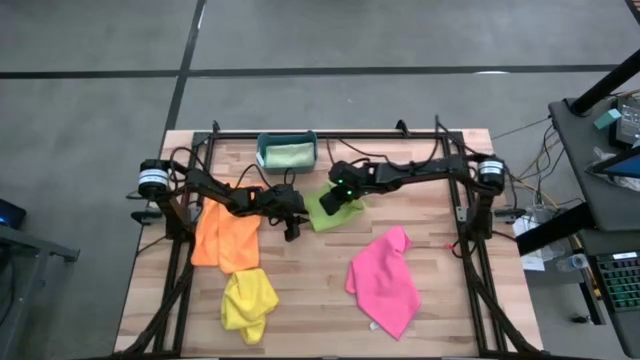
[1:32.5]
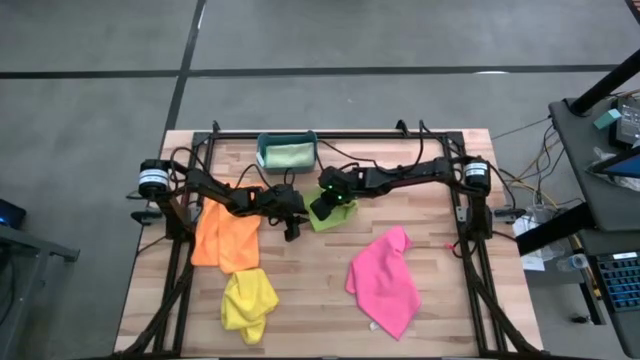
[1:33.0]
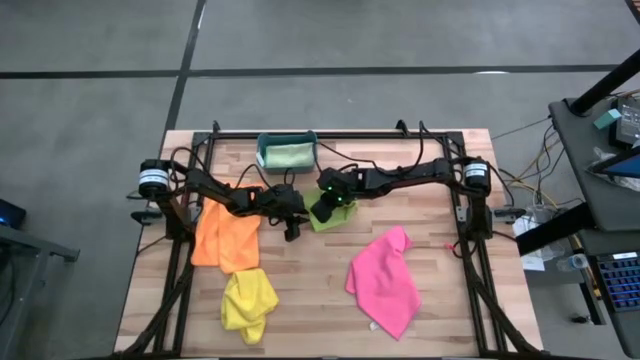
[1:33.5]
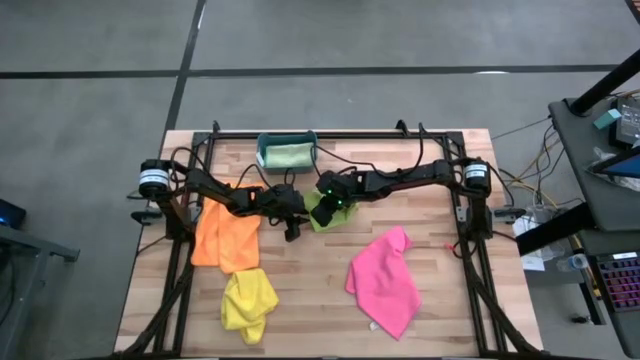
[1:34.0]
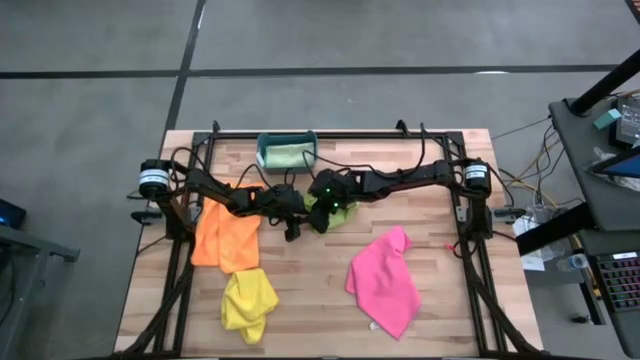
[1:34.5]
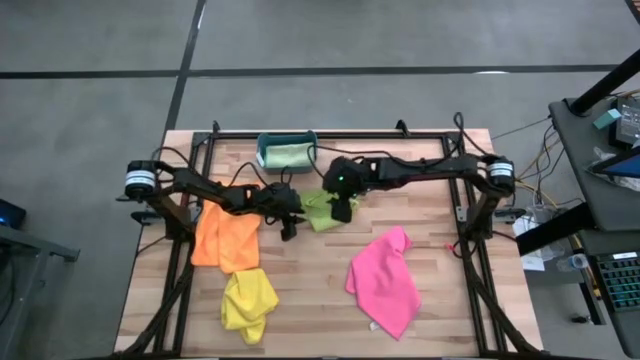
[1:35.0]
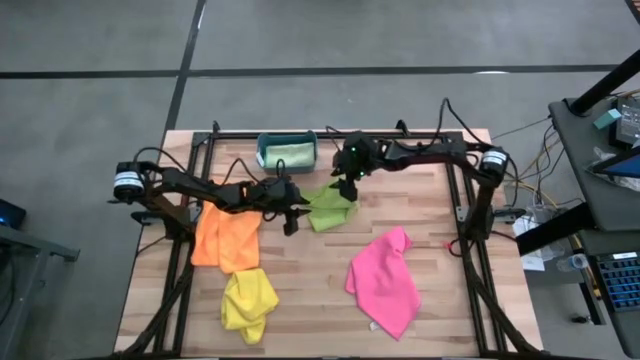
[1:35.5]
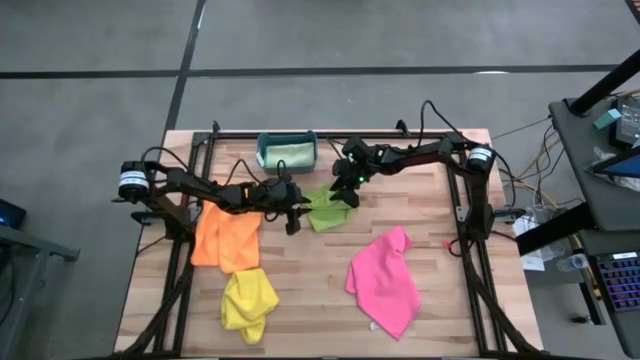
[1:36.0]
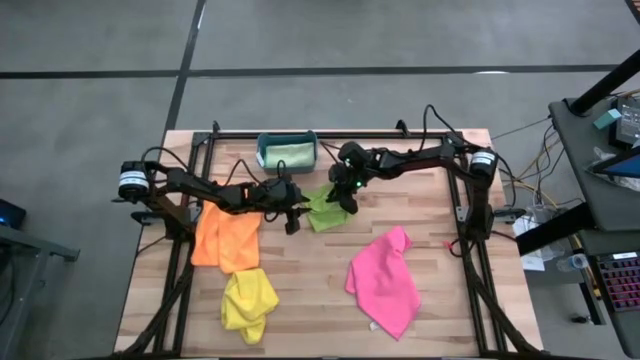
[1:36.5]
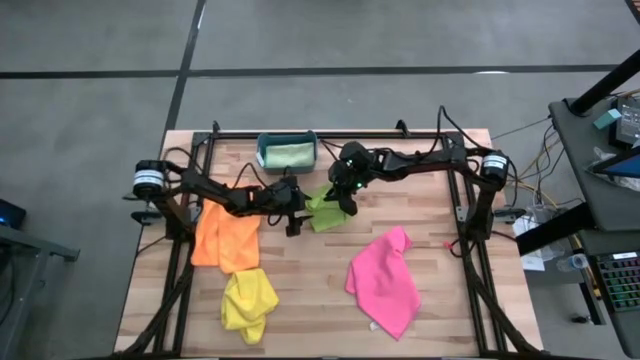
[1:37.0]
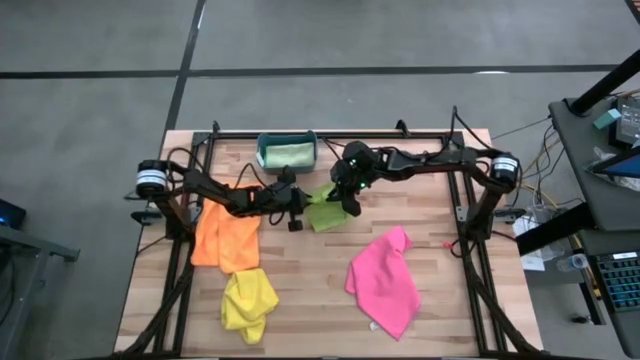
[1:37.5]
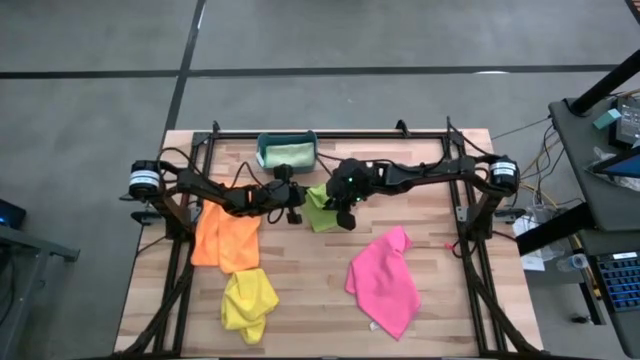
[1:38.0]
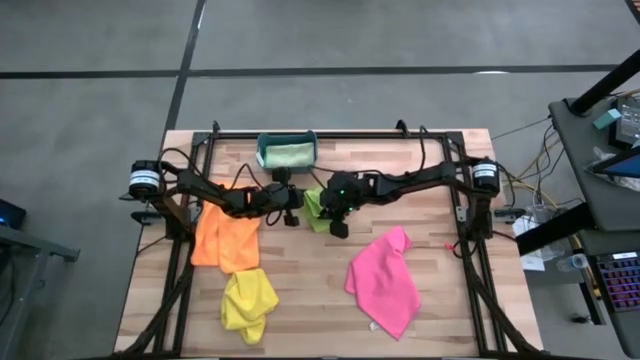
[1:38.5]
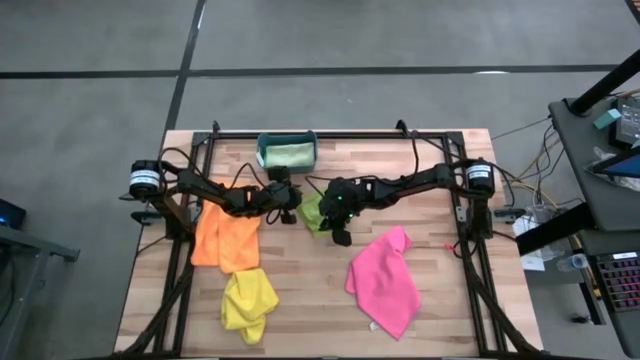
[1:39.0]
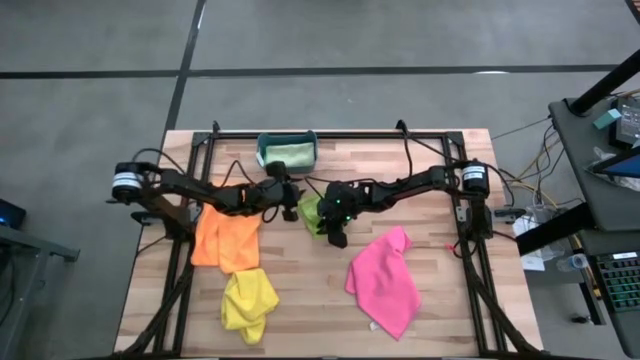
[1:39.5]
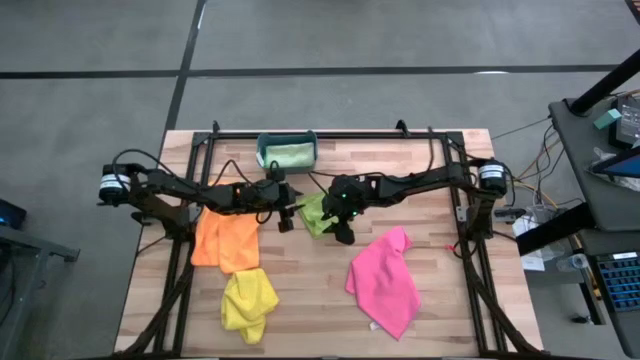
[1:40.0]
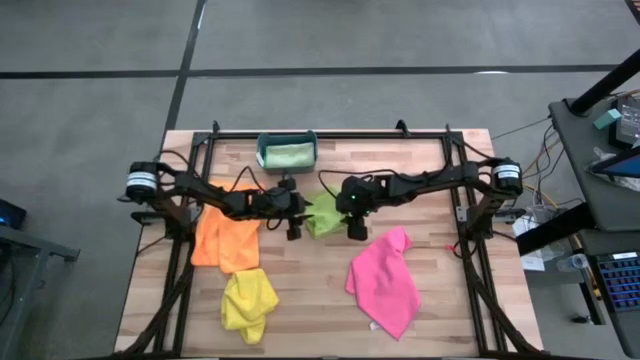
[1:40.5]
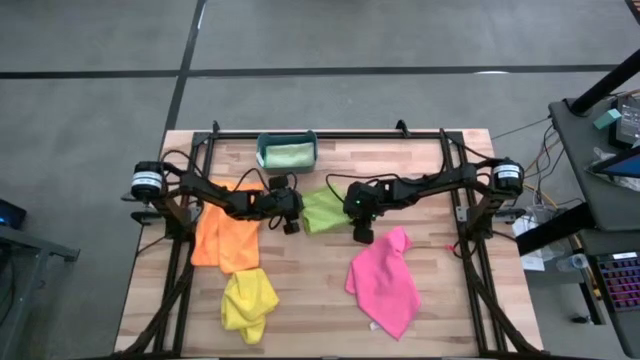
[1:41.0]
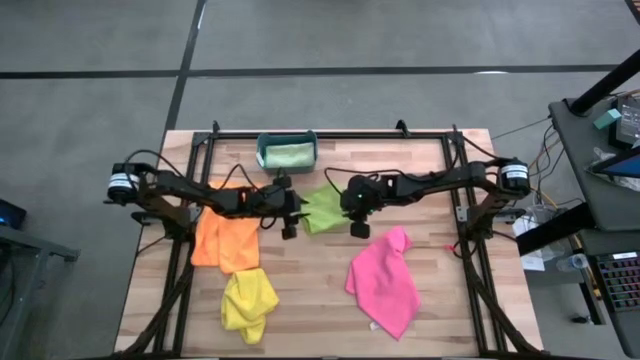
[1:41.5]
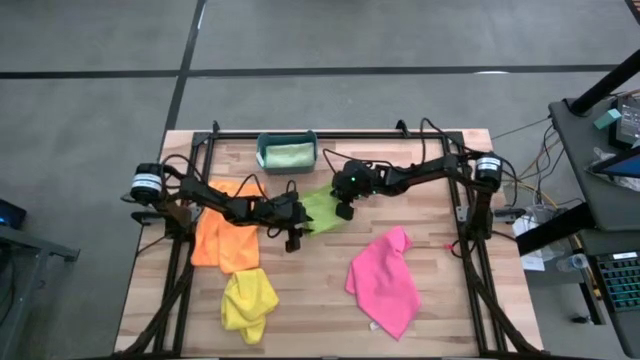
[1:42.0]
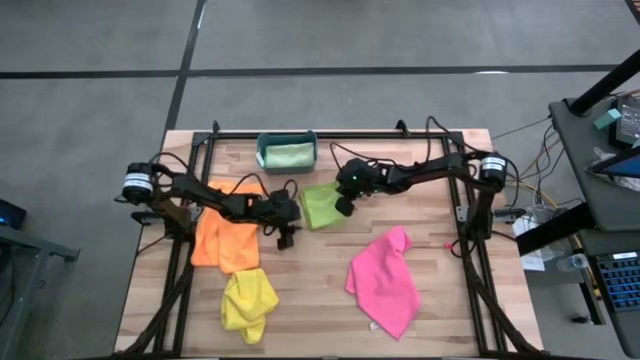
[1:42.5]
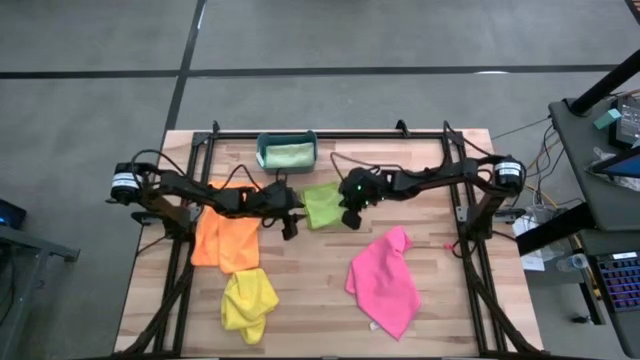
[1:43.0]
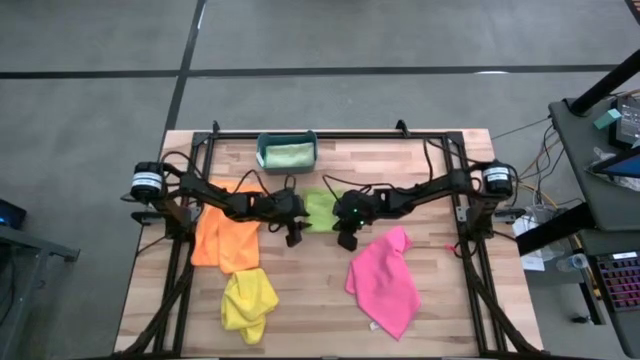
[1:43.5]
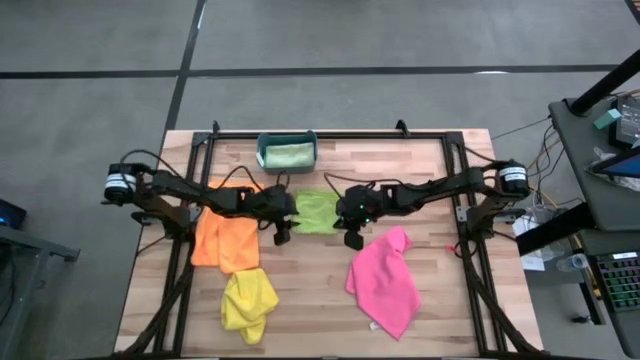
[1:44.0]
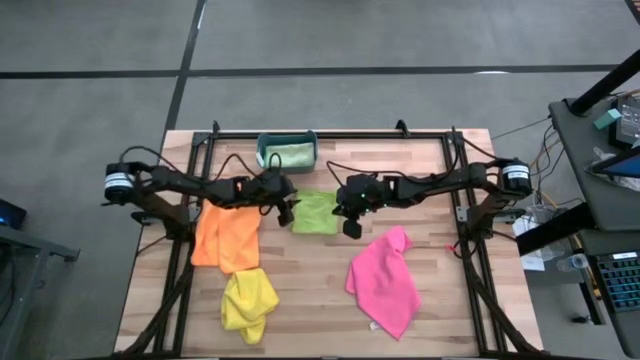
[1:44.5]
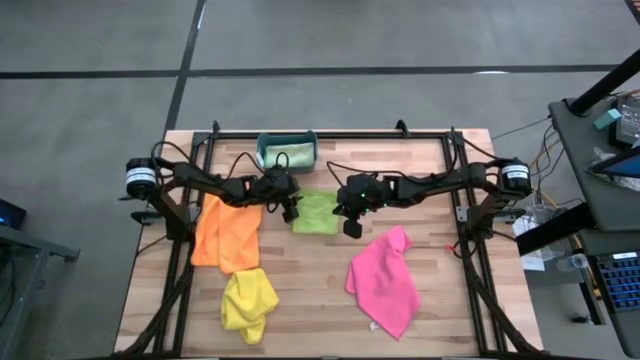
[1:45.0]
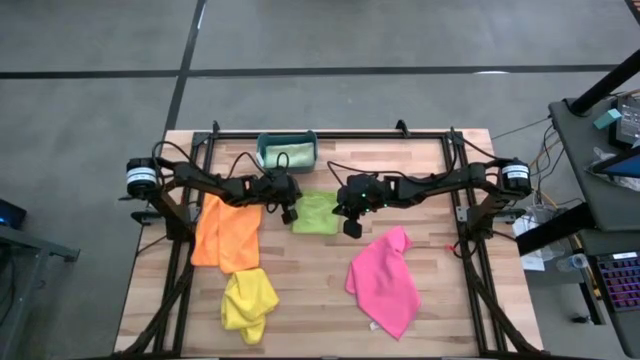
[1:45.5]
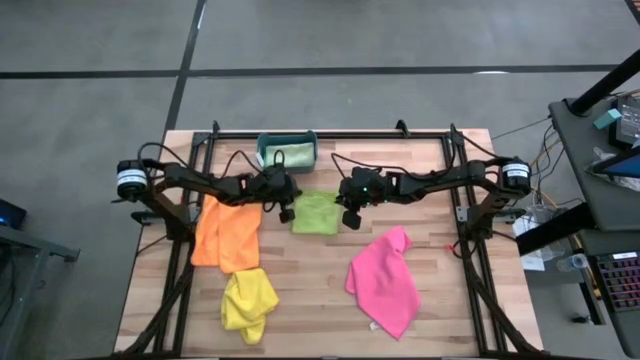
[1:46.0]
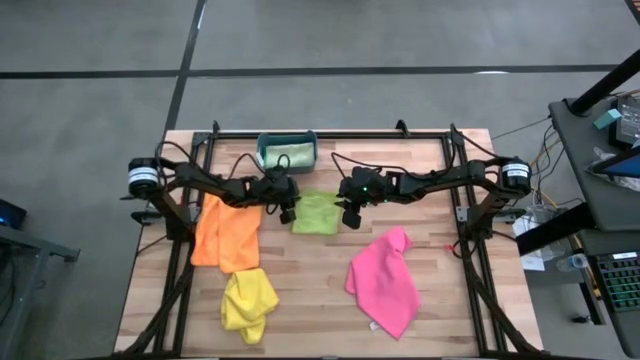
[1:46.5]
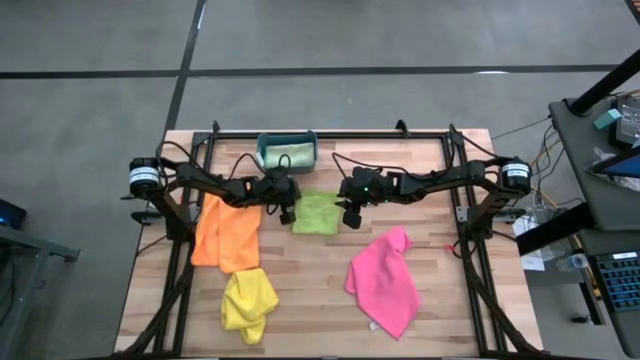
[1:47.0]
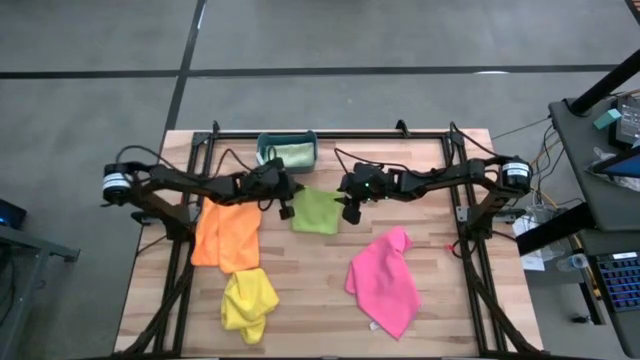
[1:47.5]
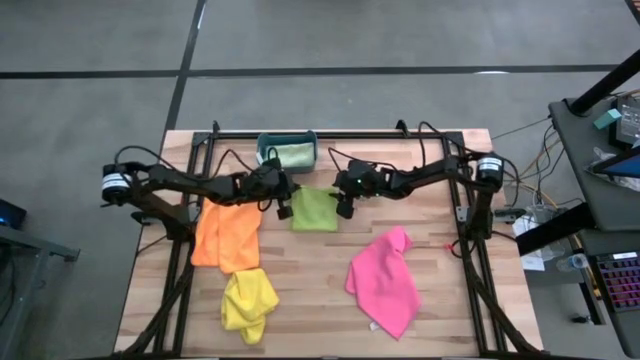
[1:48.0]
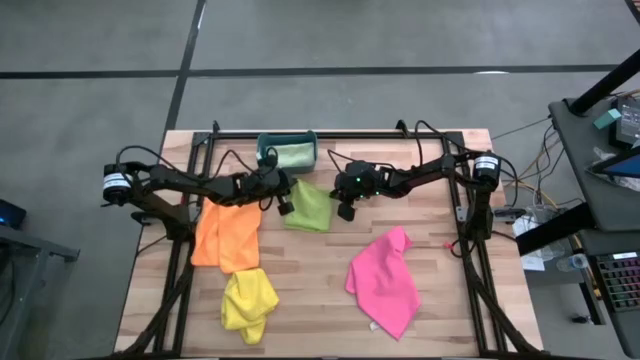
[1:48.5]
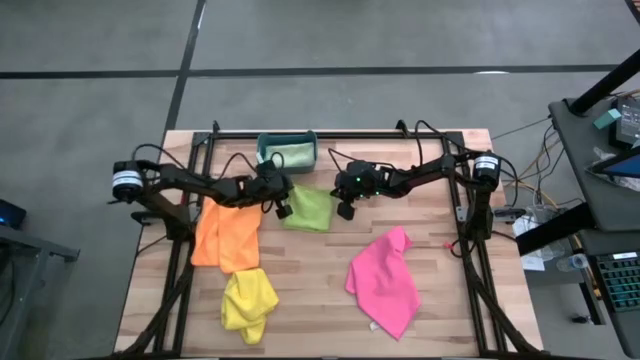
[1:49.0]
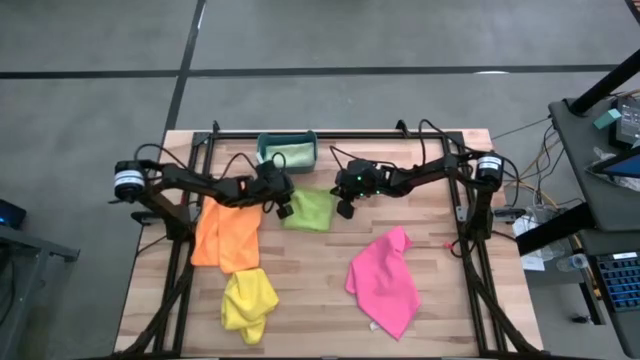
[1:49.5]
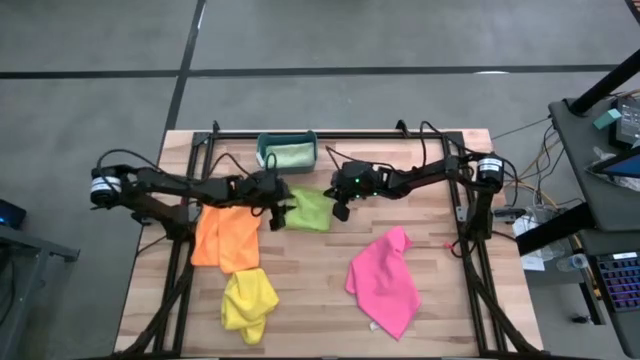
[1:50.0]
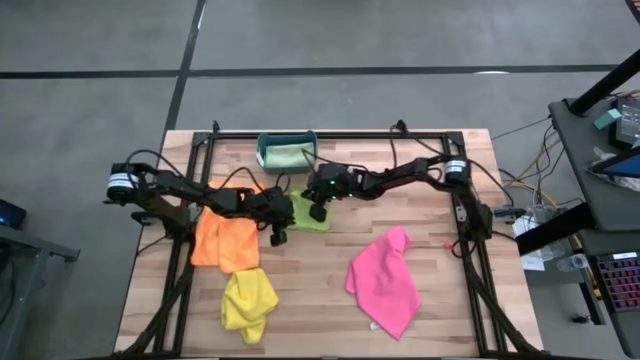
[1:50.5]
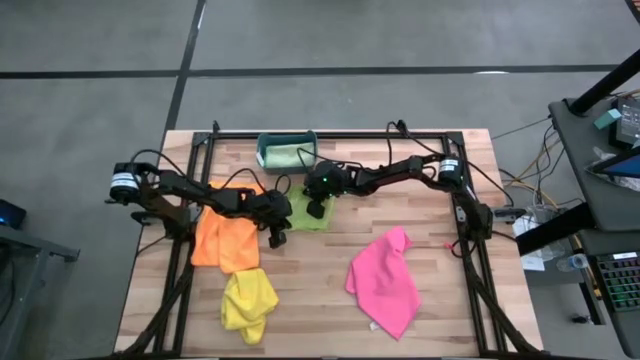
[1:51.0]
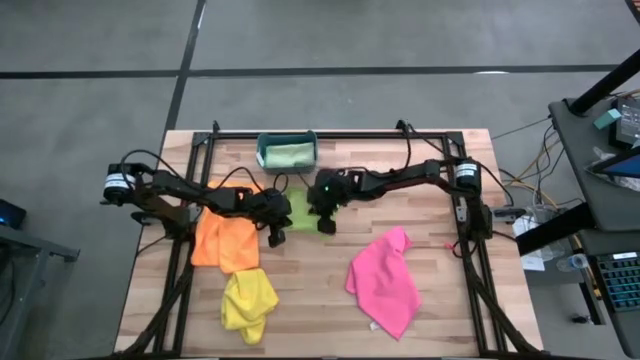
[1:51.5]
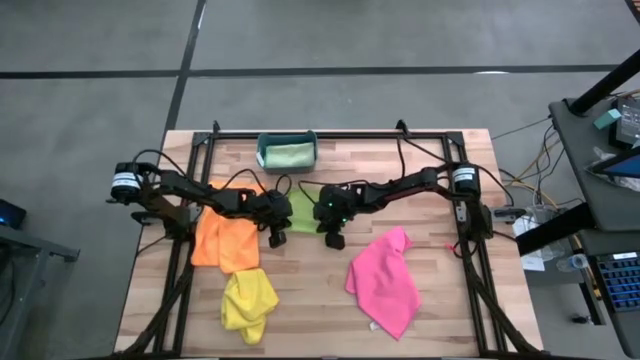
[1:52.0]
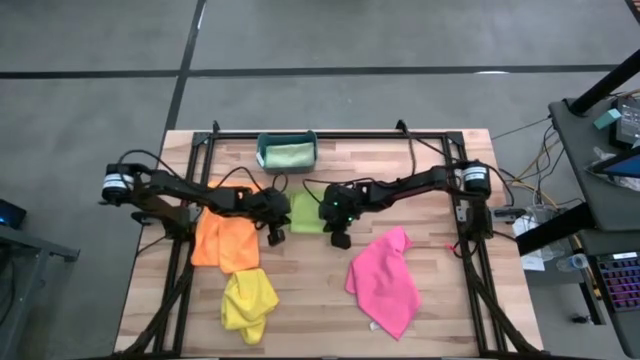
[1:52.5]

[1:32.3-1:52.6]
Task: Fold microfiber towels
Fold the green towel
